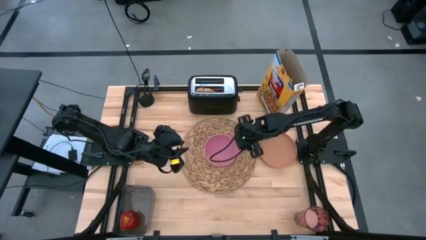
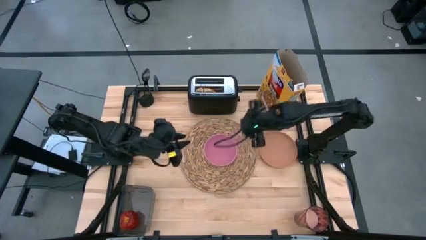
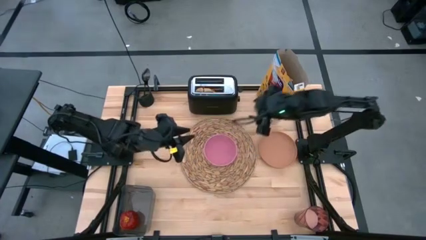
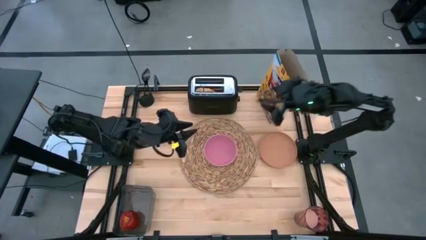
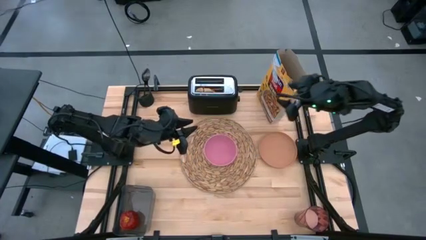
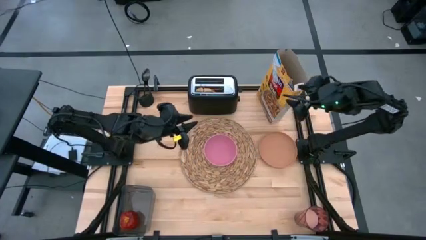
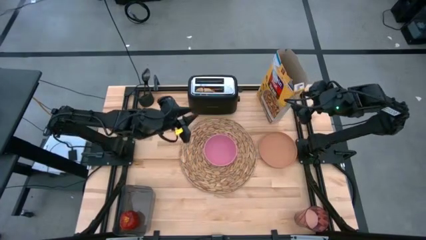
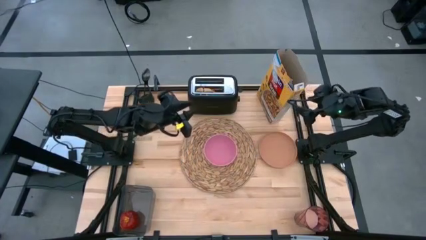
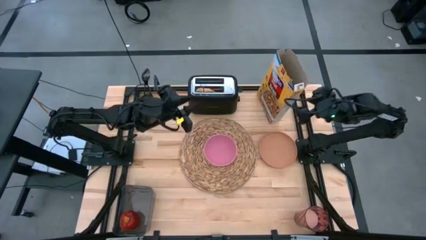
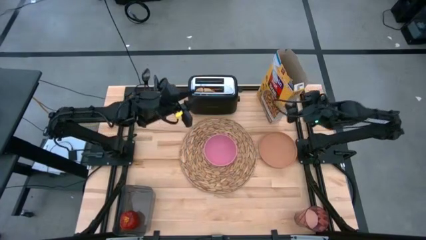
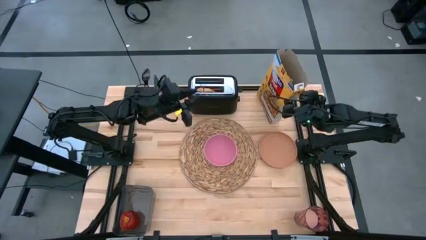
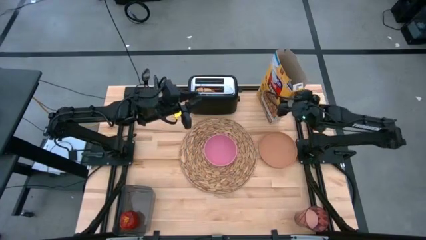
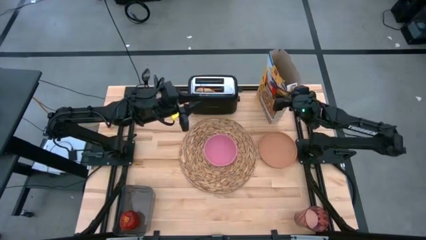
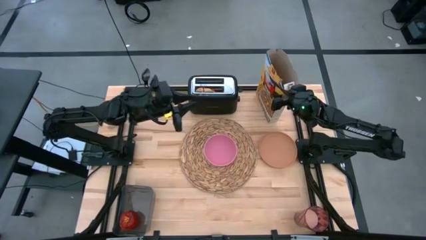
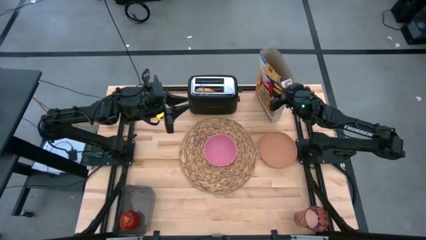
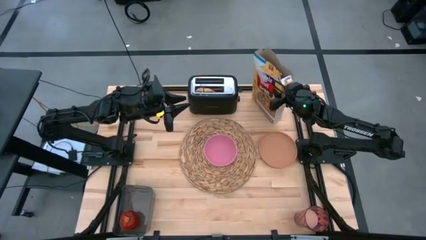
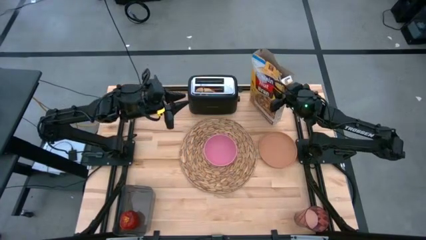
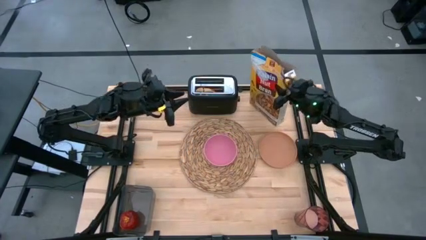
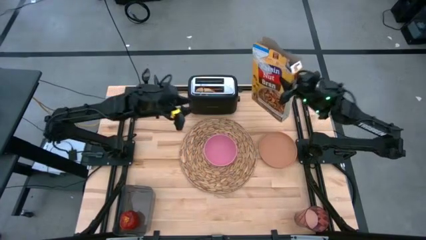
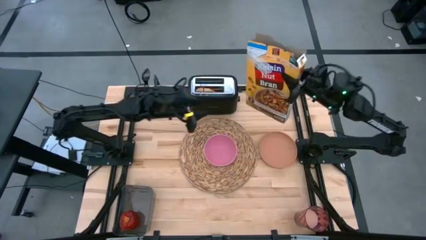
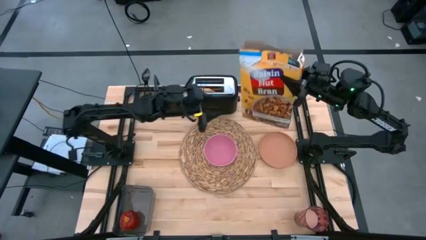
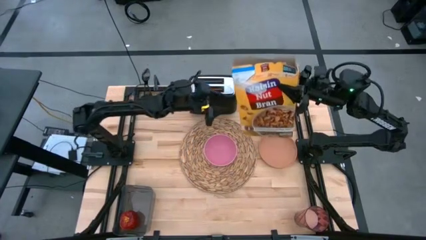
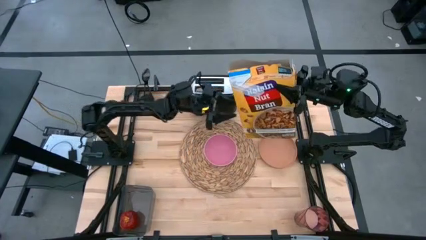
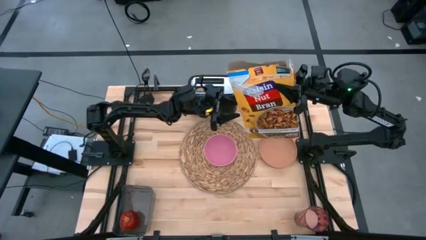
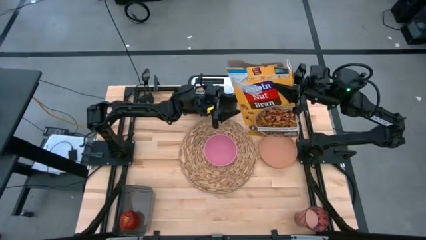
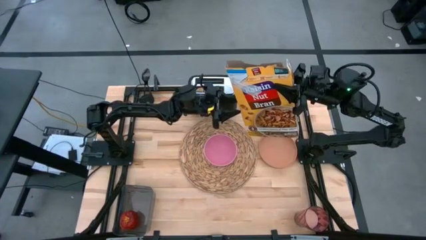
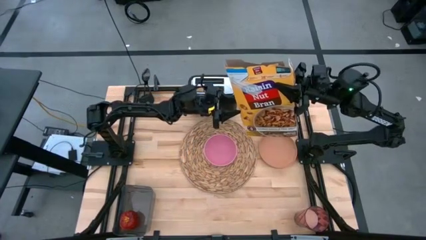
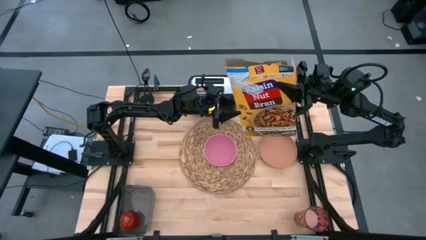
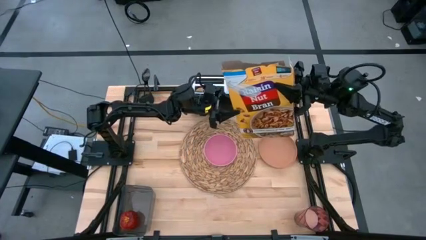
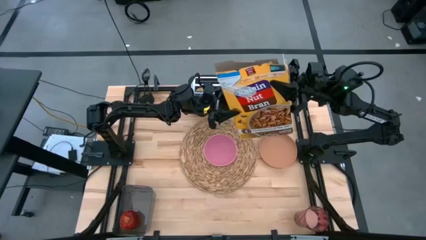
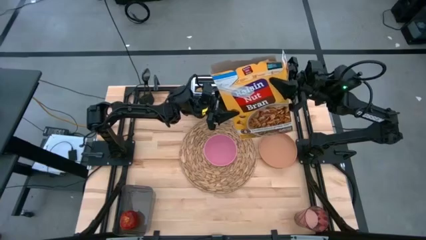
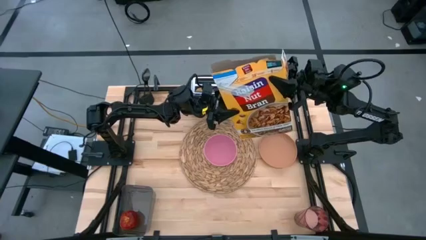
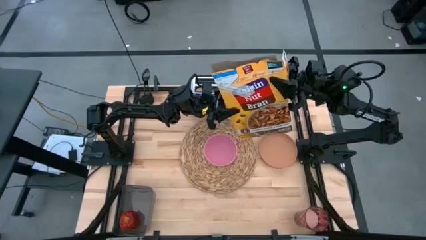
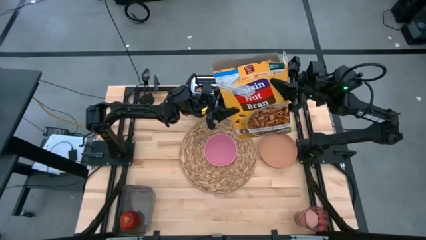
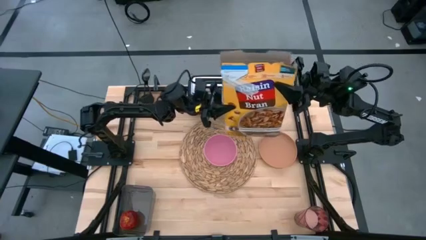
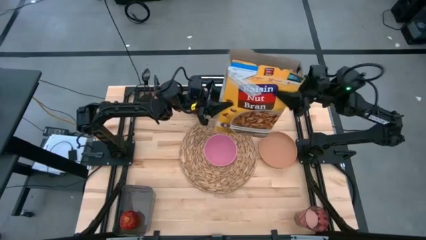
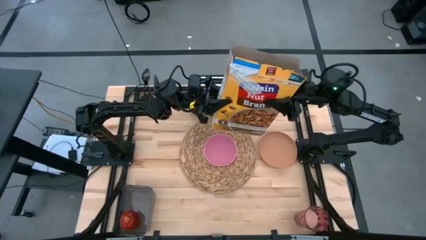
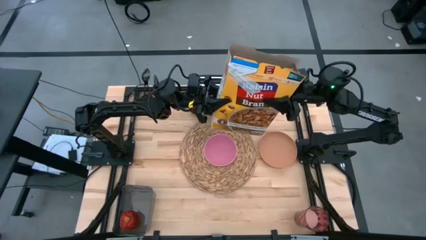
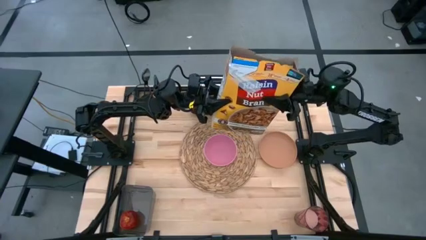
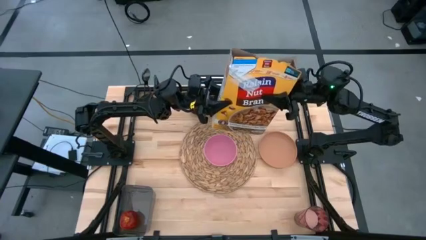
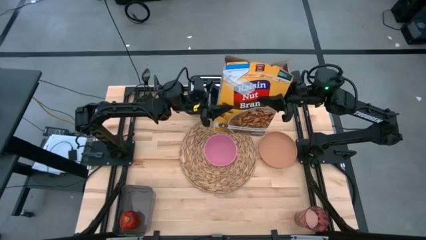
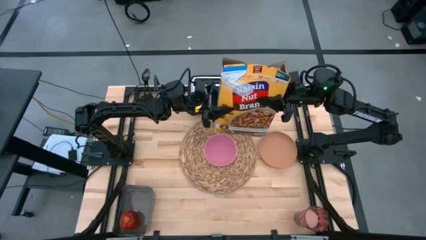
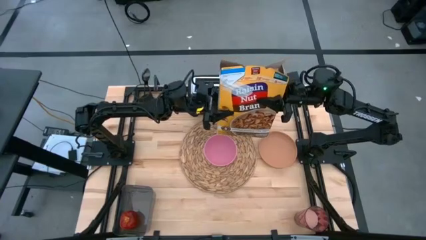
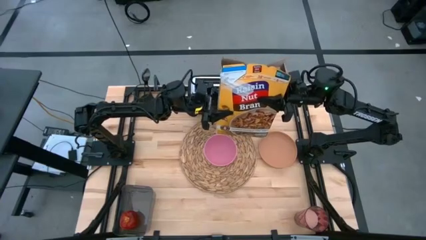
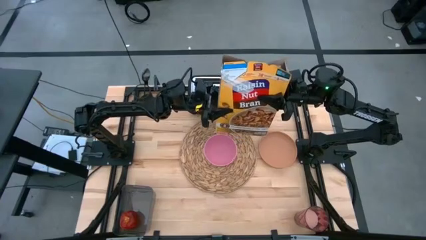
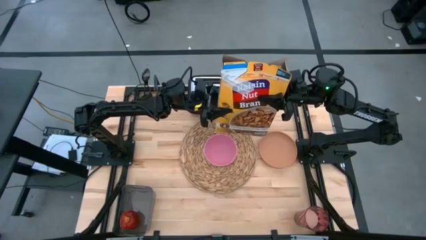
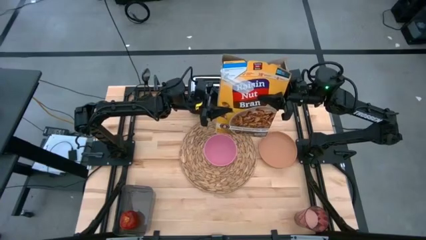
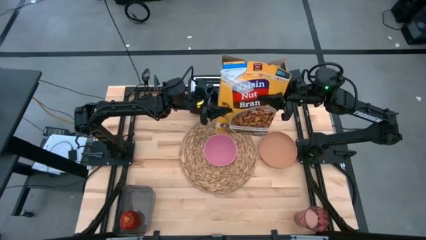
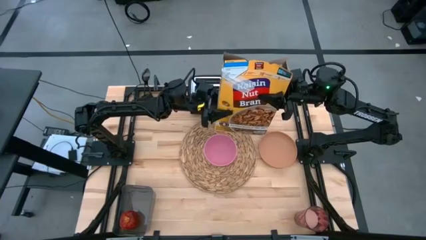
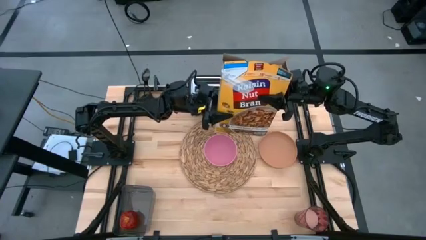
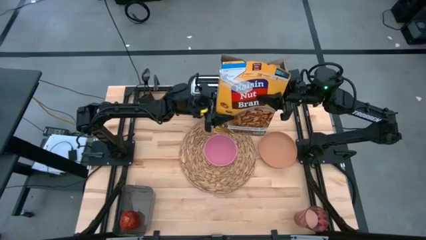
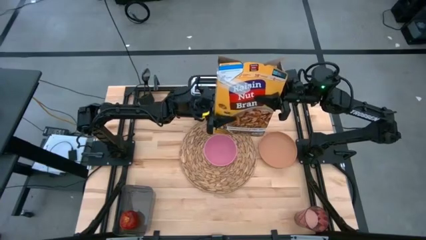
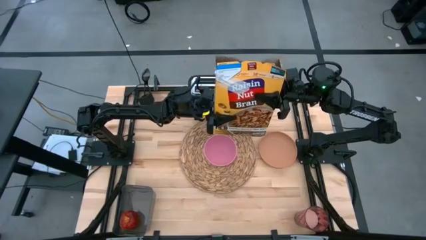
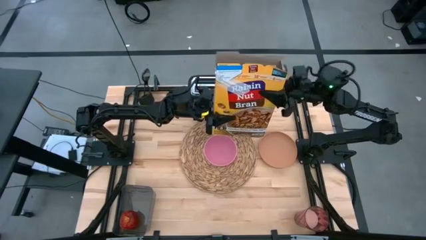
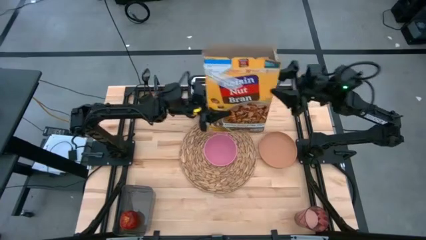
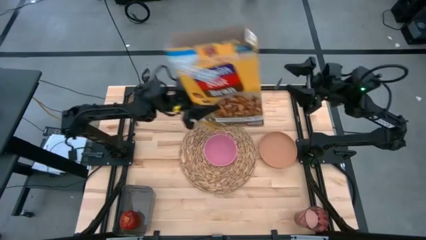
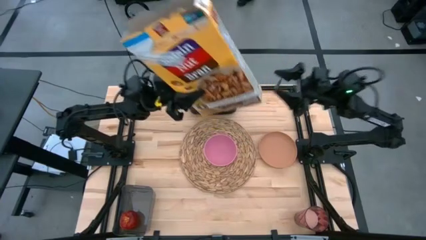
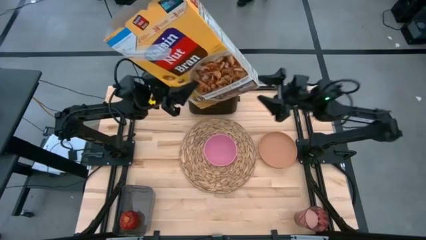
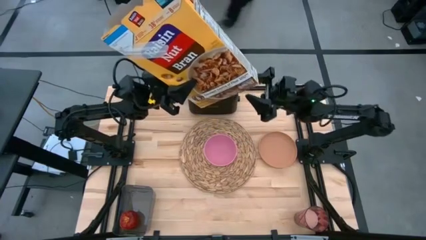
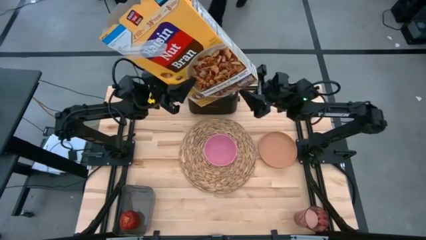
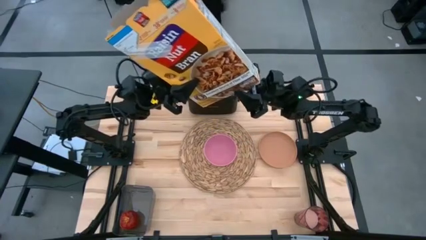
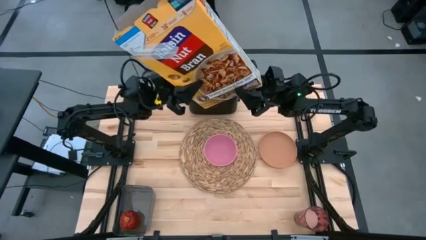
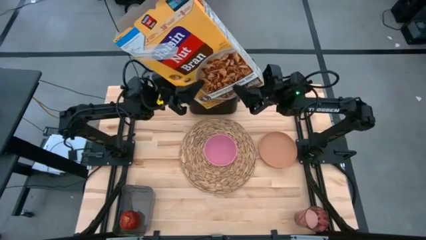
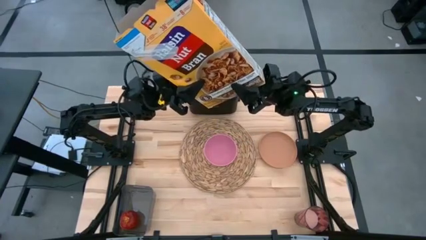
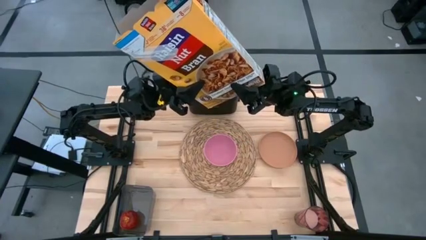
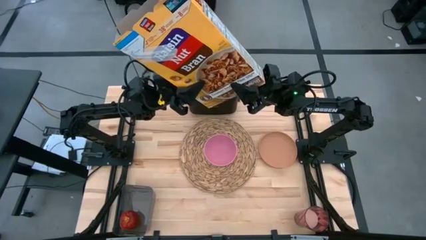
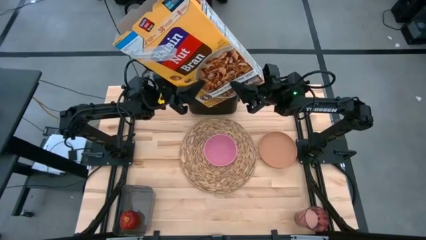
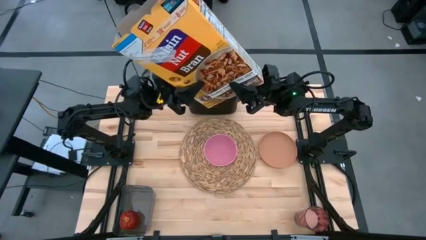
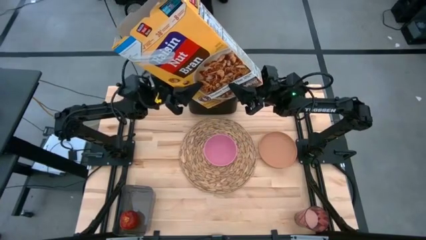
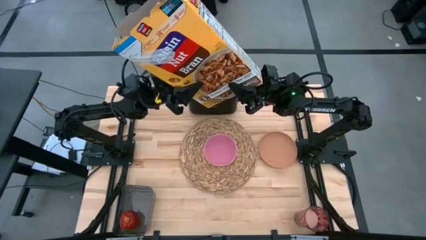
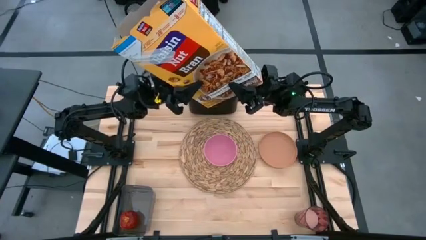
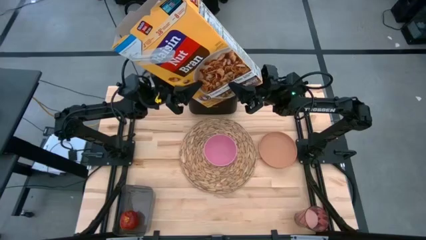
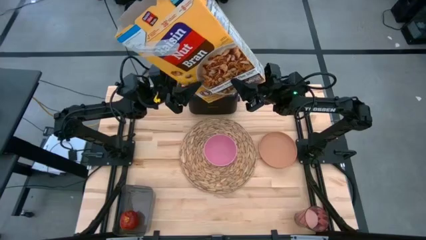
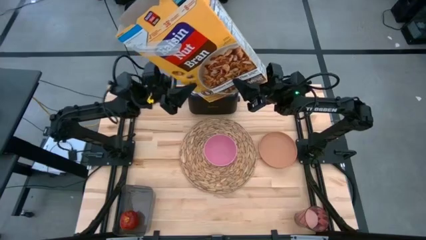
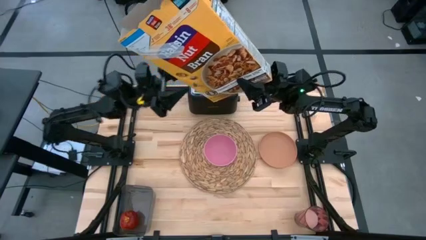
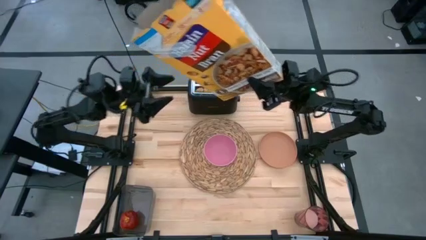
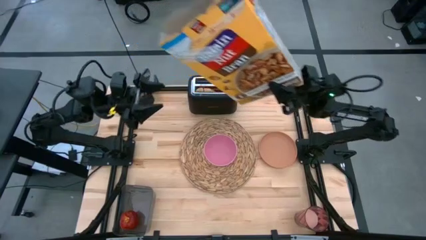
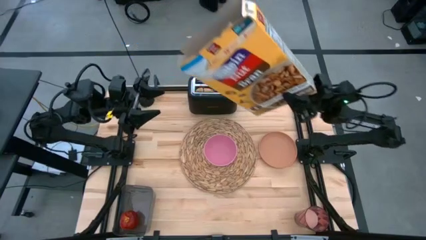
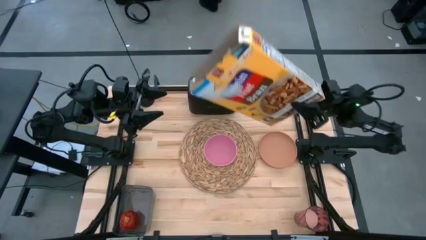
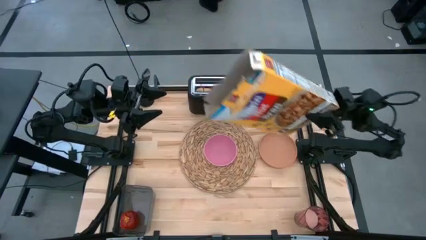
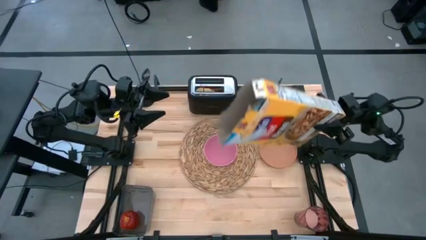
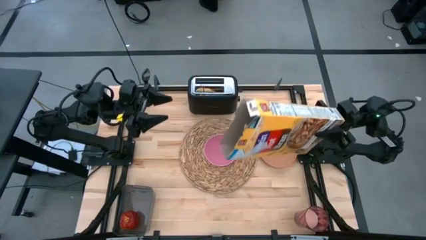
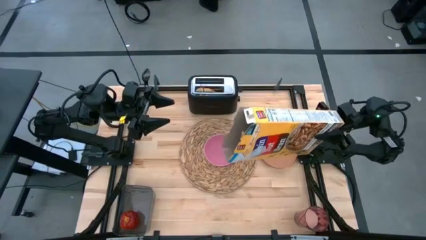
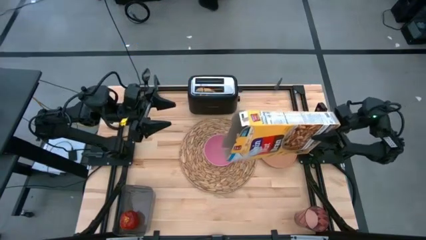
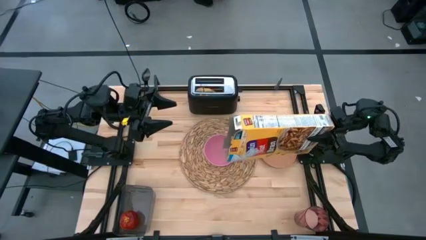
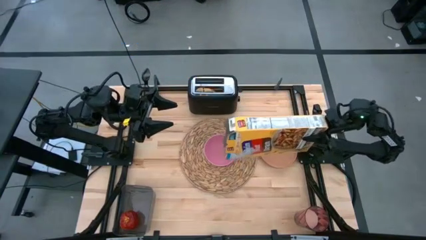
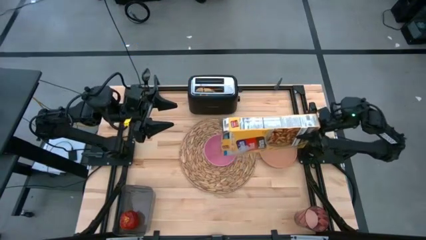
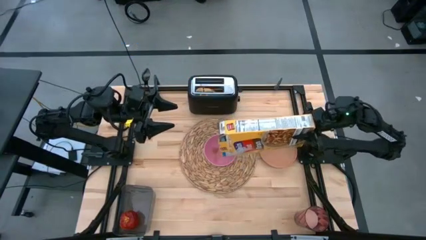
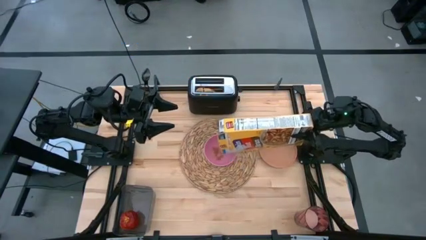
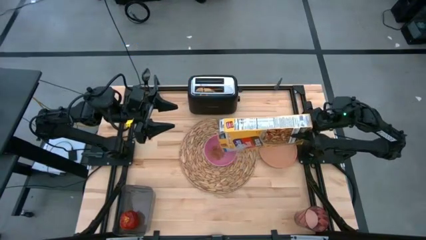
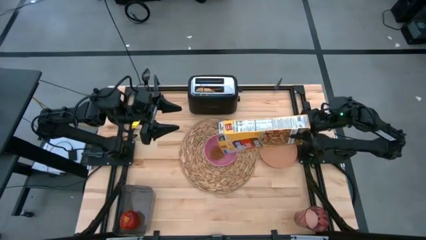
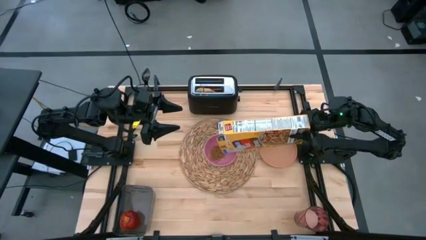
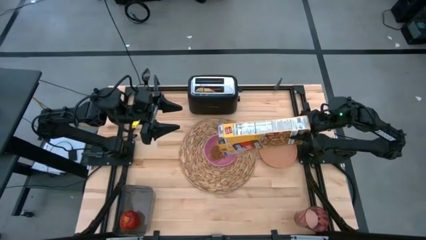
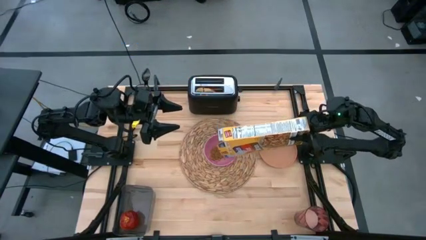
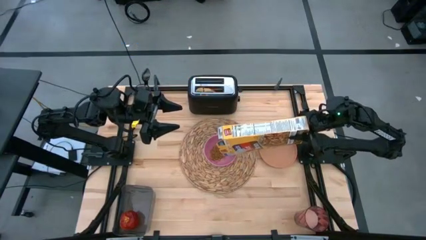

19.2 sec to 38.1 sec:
Task: Arrange a breakfast setting
Pour the cereal from the box into the pink bowl
